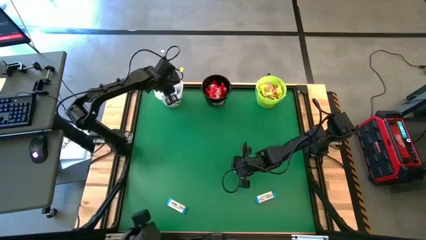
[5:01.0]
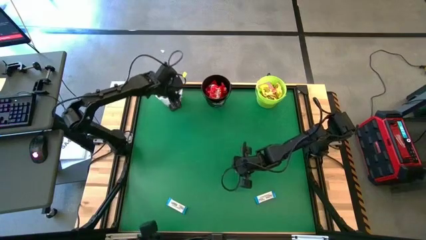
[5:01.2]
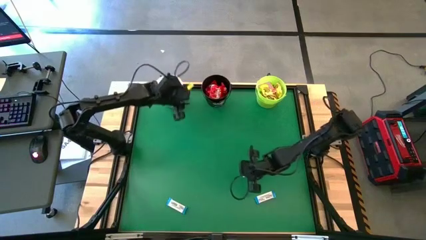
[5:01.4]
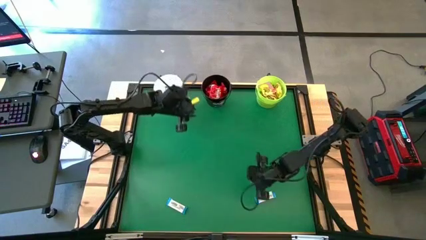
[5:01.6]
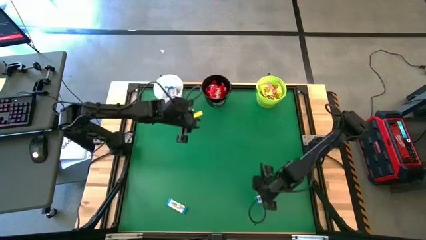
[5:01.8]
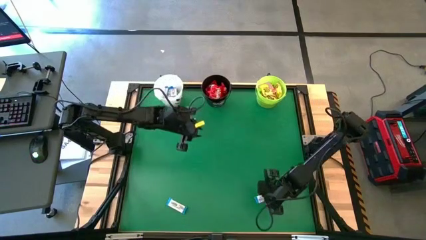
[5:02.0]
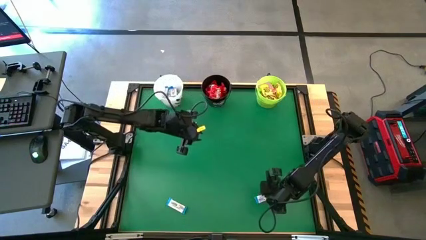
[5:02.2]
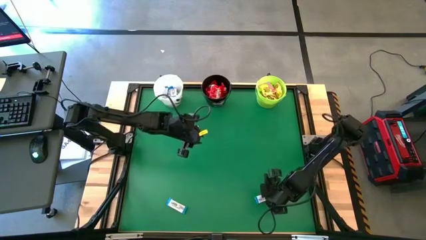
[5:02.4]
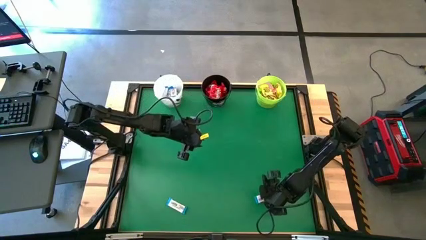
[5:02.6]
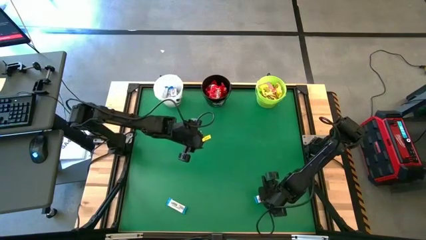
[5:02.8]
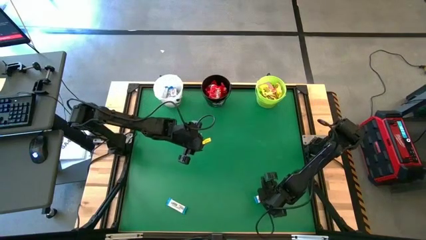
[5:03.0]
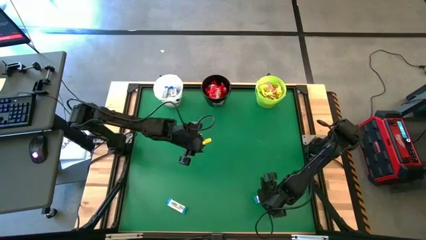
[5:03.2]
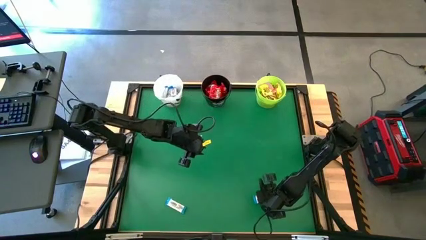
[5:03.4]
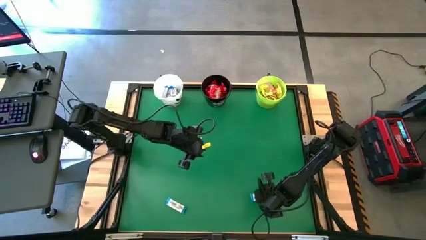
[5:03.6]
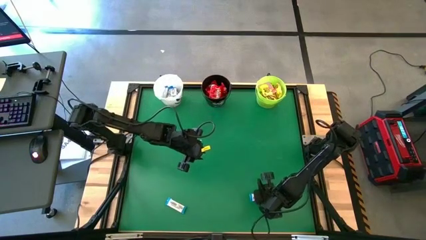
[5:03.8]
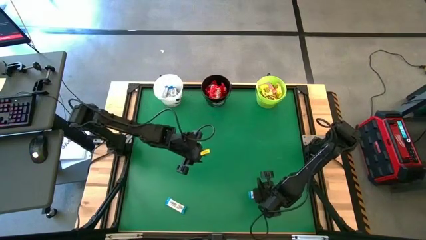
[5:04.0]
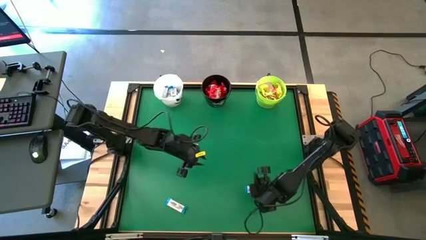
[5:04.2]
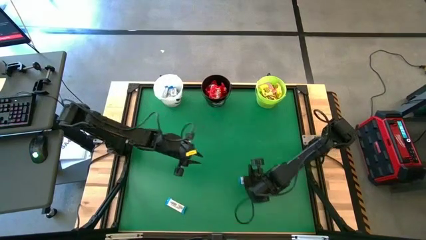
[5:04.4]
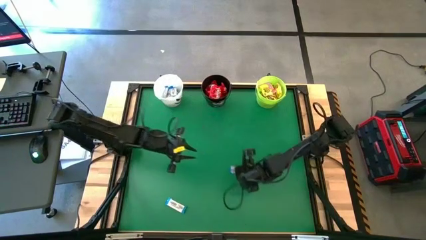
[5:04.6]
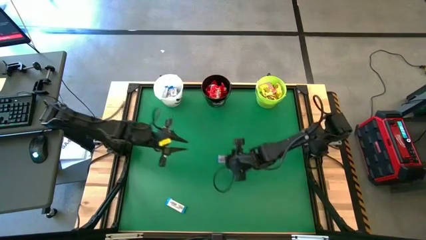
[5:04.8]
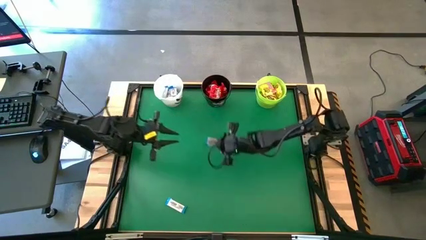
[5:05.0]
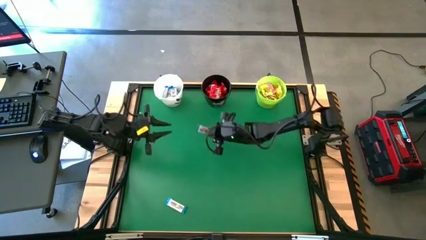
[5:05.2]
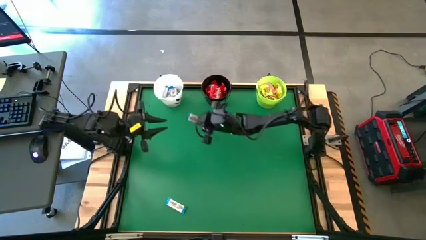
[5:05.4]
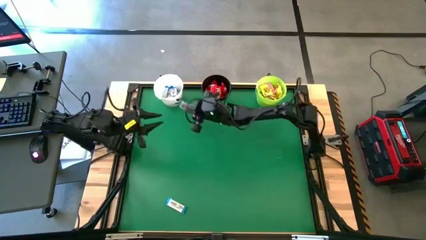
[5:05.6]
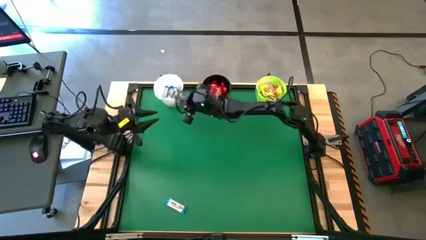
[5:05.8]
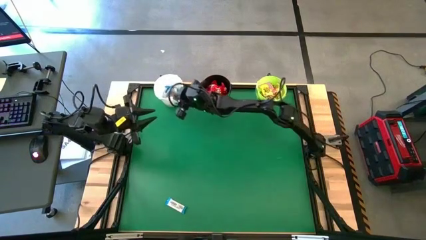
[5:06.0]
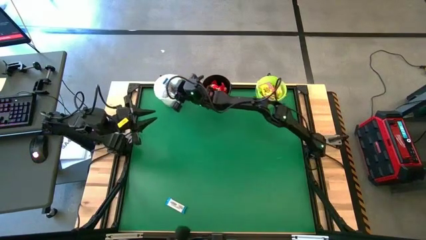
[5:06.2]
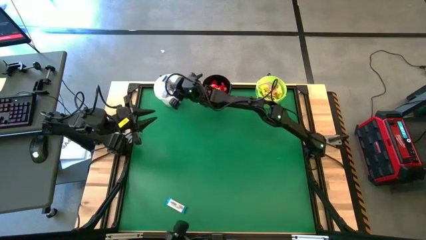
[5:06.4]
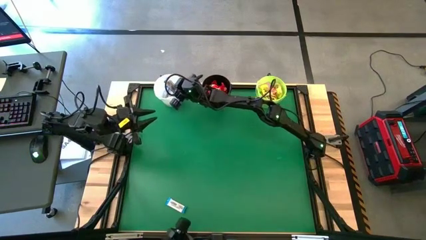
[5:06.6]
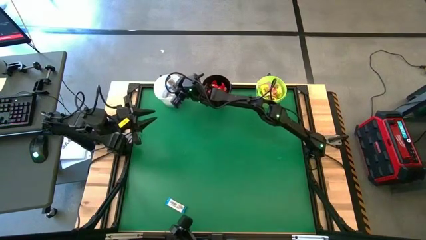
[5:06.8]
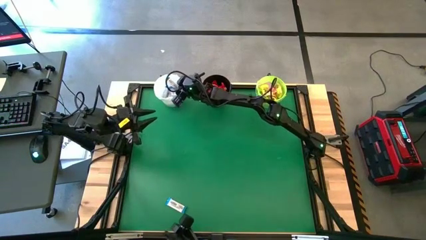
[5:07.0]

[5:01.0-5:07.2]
Task: Sort candy by brand, put in halloween buckets
Put the white chocolate bar into the white bucket

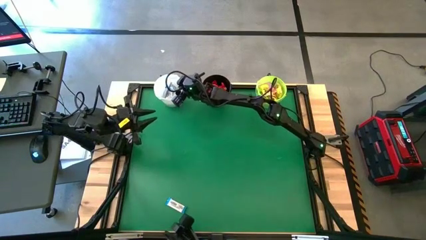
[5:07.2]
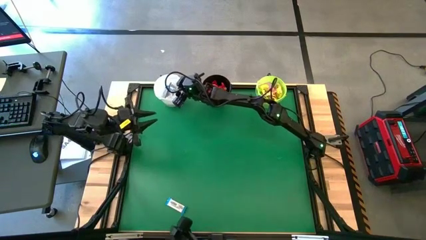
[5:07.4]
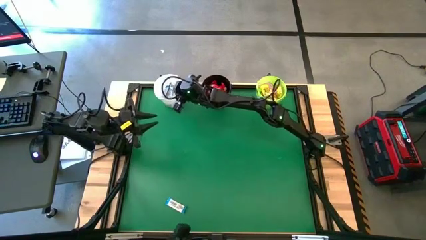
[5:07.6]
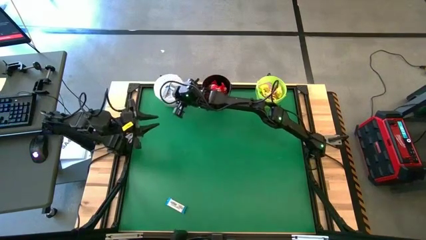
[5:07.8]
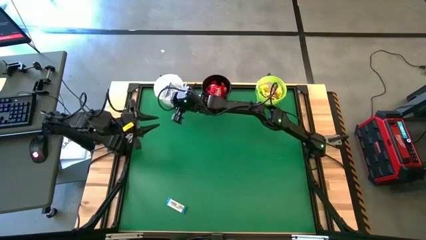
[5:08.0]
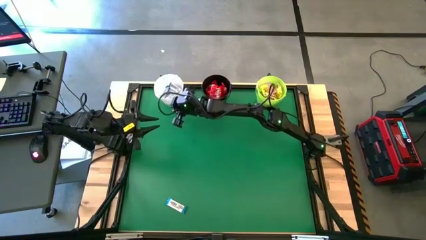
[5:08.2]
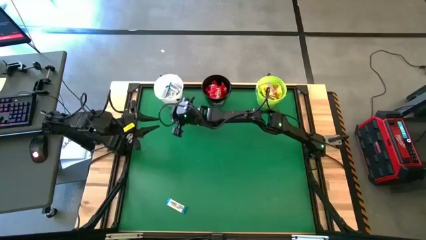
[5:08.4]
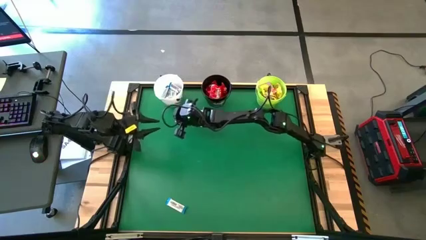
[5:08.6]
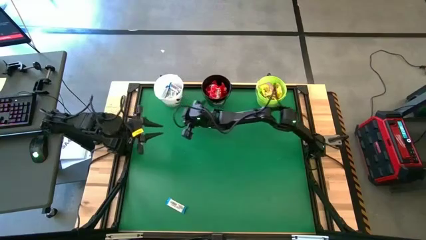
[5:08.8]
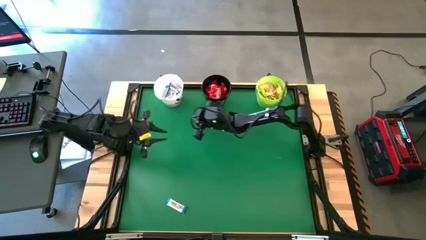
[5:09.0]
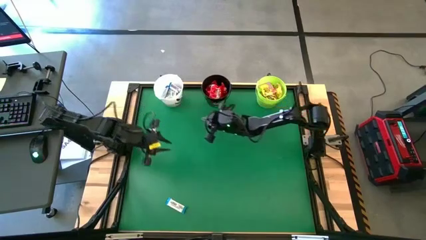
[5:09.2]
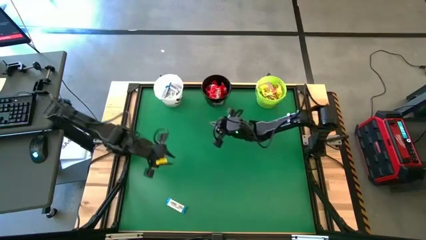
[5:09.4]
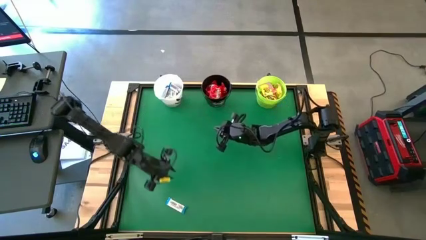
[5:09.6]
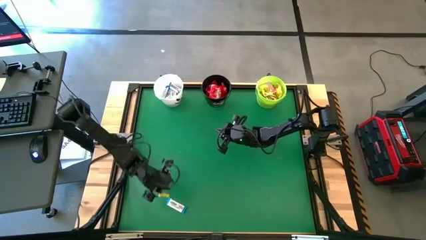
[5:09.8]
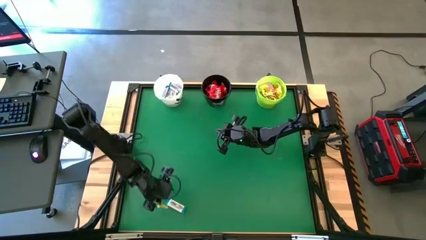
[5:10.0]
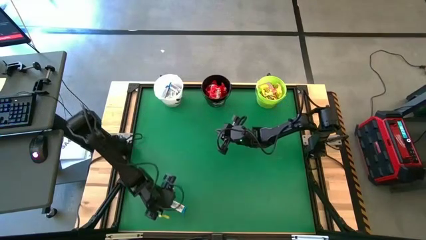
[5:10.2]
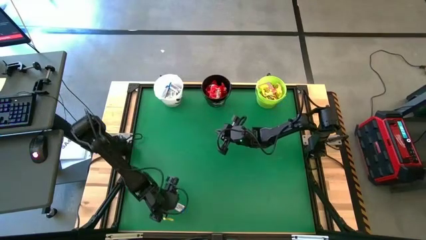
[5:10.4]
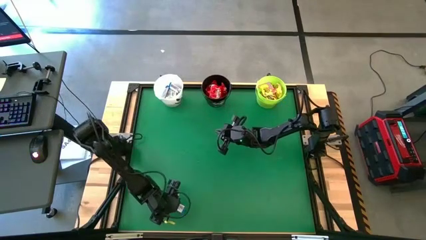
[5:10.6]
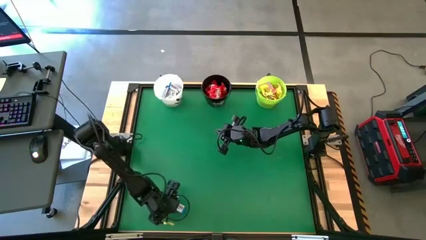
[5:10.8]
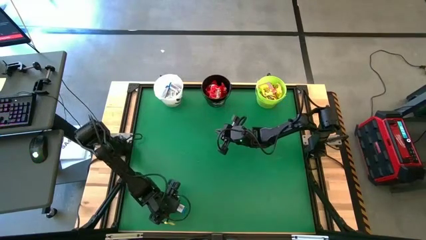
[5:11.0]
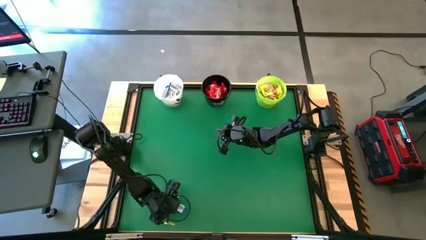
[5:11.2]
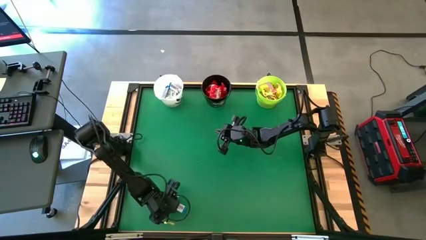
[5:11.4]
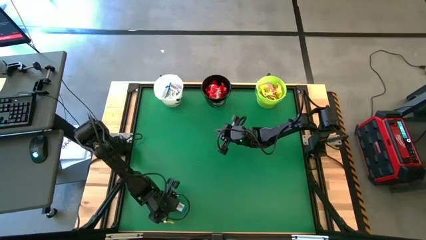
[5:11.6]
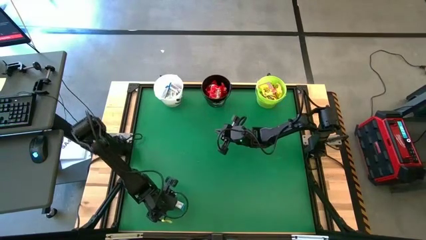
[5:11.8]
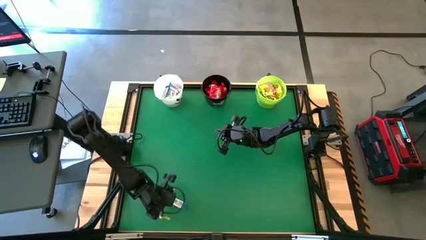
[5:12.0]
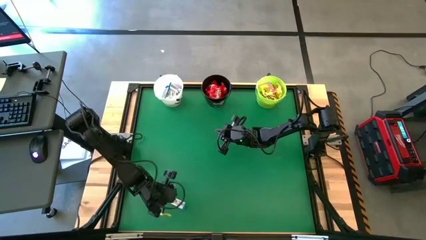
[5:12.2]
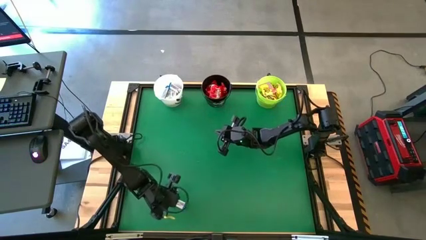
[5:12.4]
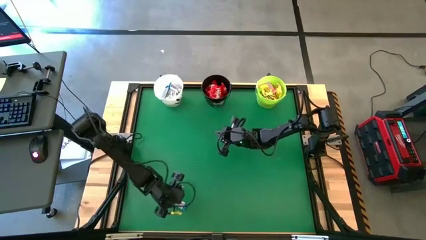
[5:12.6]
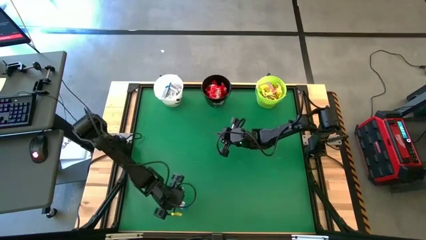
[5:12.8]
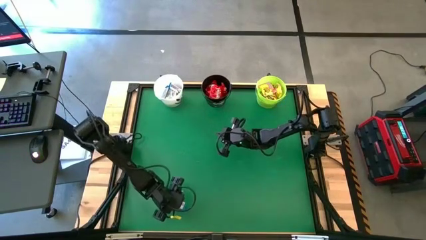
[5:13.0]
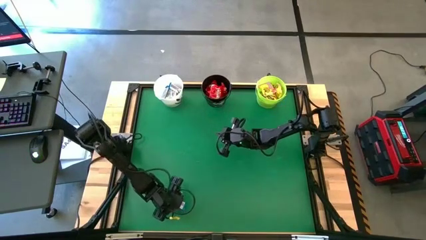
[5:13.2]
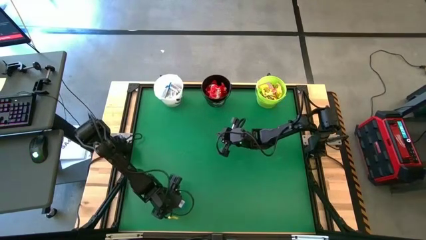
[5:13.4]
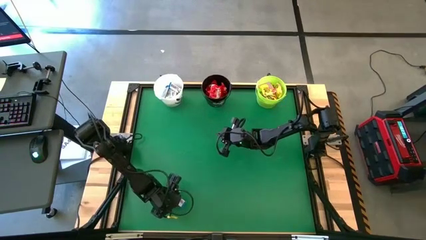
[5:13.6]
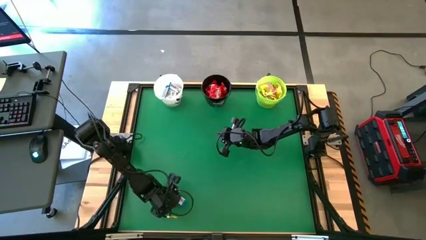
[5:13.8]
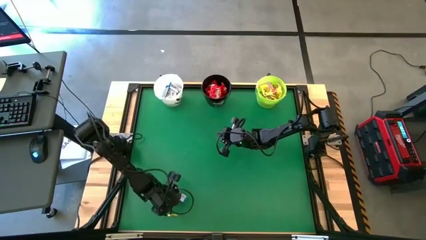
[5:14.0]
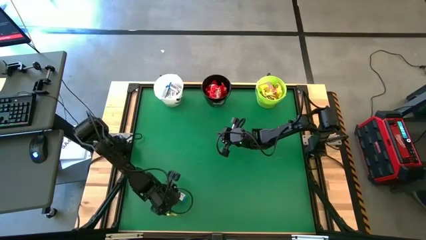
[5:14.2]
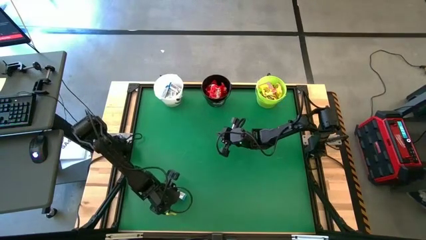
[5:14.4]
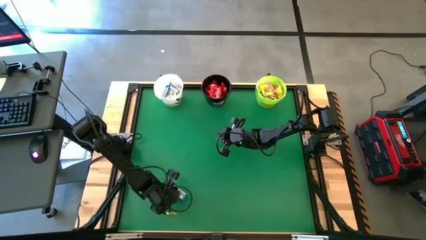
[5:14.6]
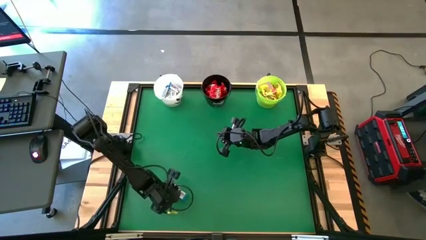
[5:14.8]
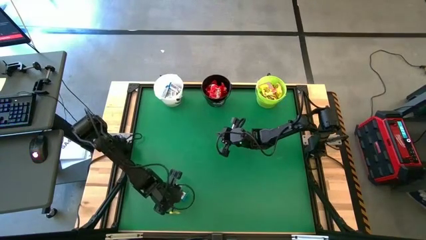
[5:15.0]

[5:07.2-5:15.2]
Put the white chocolate bar into the white bucket

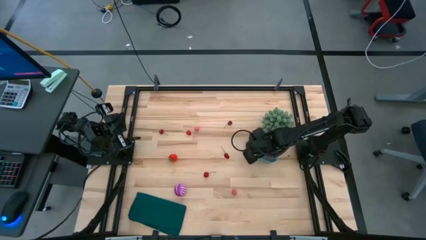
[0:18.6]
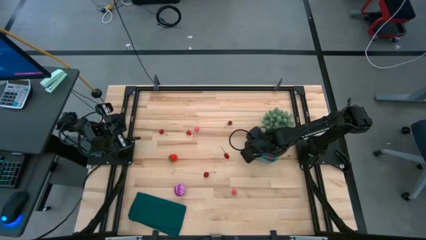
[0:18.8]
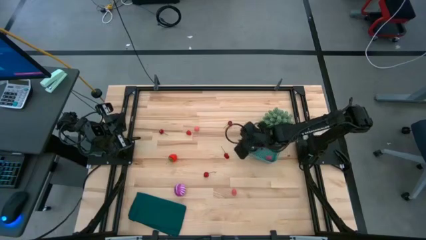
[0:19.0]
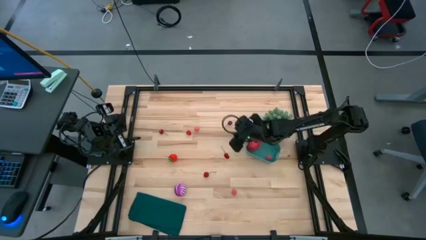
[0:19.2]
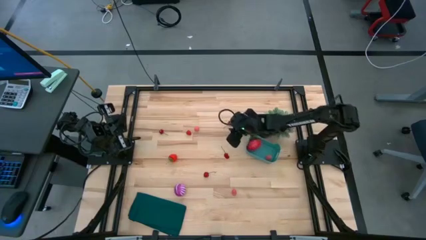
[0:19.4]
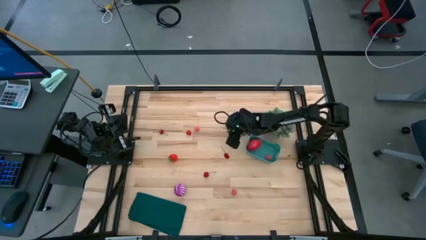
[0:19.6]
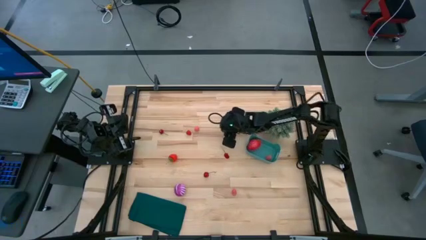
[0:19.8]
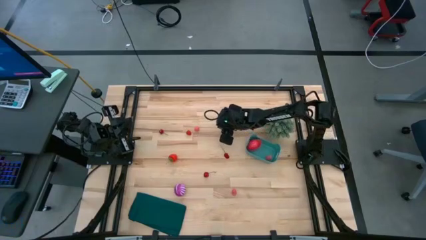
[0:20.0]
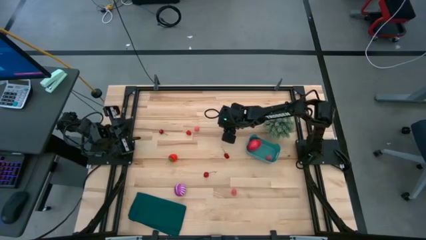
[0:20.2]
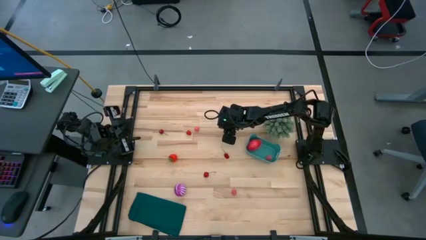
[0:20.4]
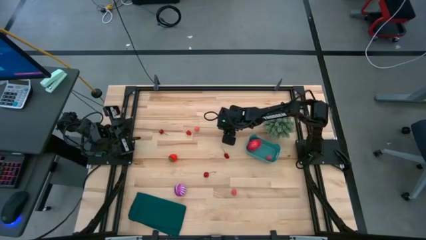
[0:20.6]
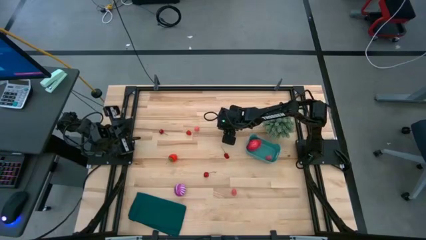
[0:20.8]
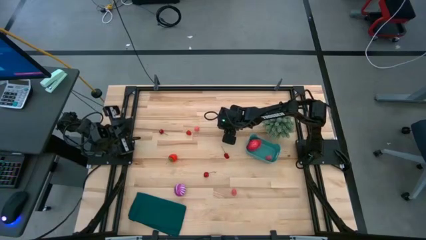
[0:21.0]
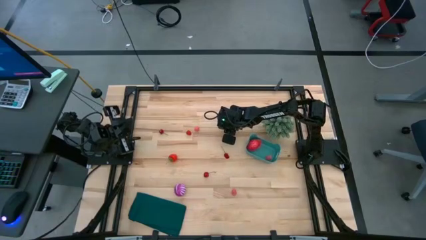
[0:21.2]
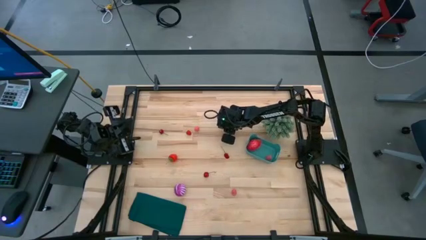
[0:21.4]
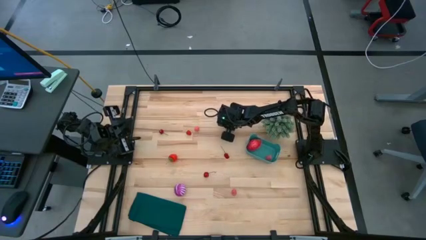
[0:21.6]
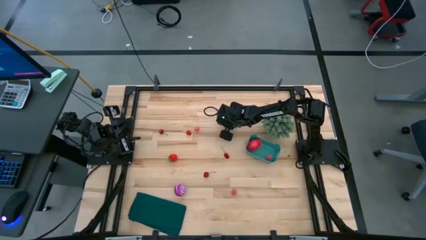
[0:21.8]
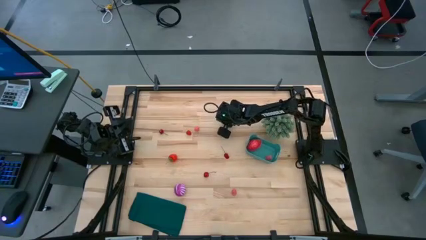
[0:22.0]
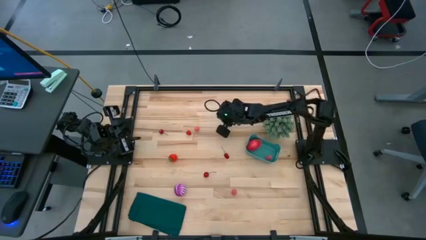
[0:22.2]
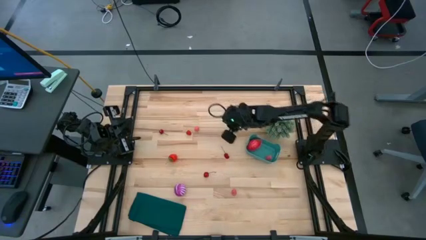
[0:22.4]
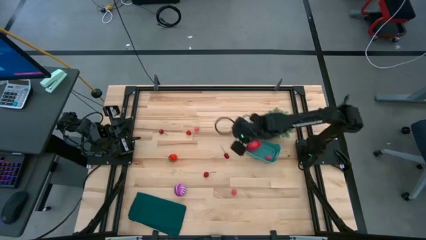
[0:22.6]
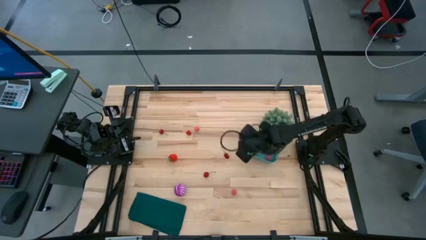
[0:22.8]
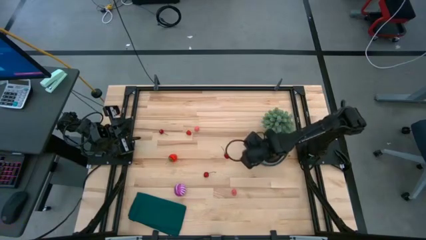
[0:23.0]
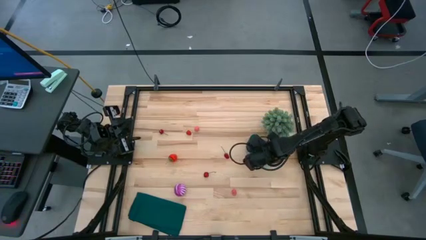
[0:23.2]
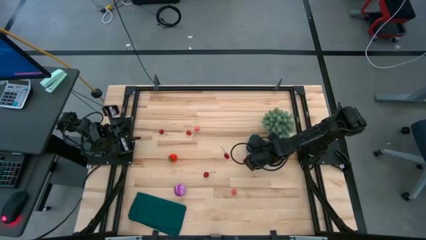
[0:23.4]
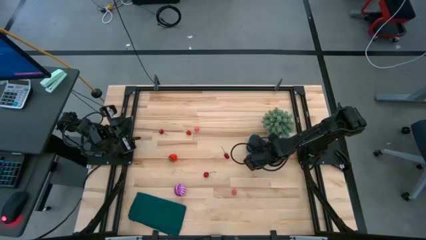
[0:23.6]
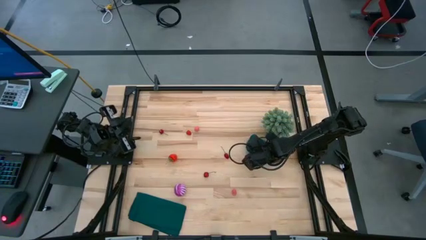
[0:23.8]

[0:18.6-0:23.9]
Task: Pick and placing Produce into tupperware
Put the cherry into the green bin
